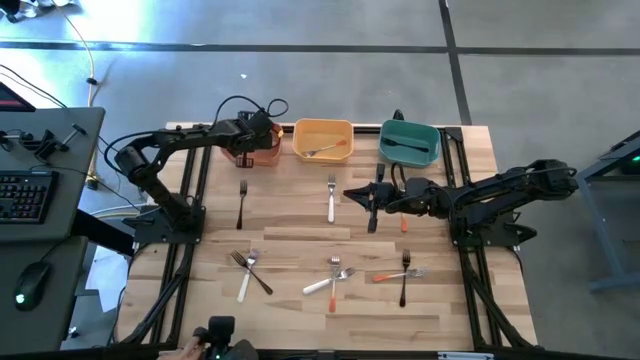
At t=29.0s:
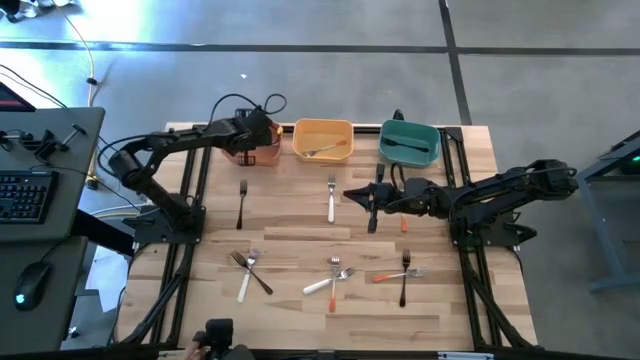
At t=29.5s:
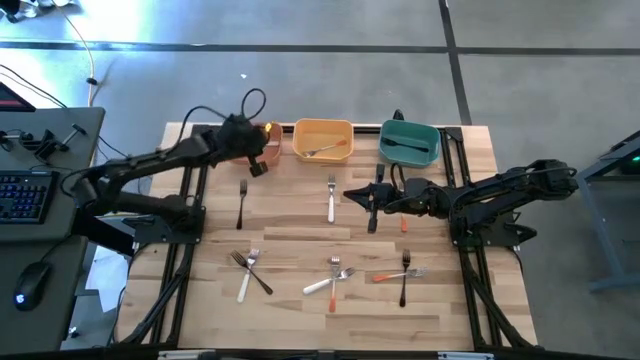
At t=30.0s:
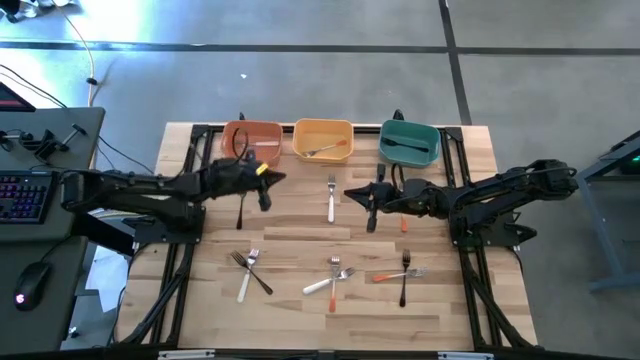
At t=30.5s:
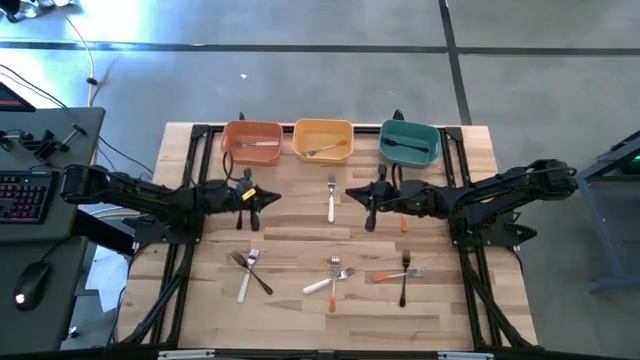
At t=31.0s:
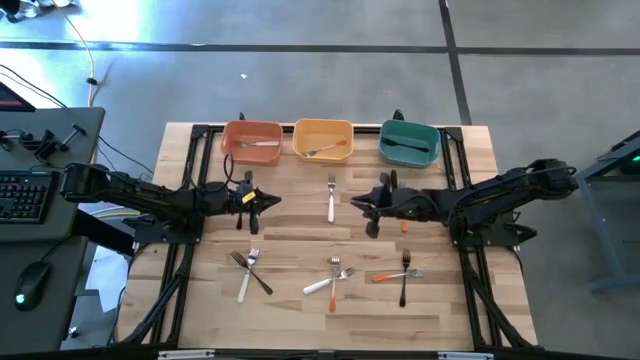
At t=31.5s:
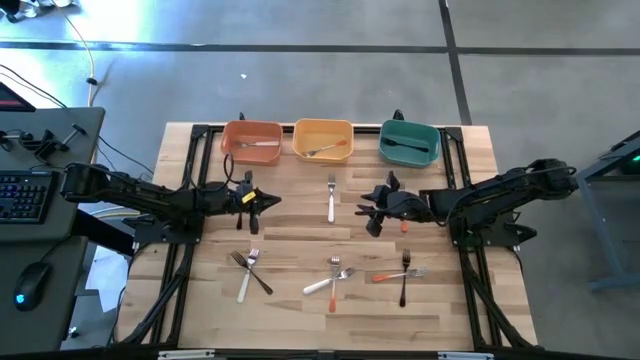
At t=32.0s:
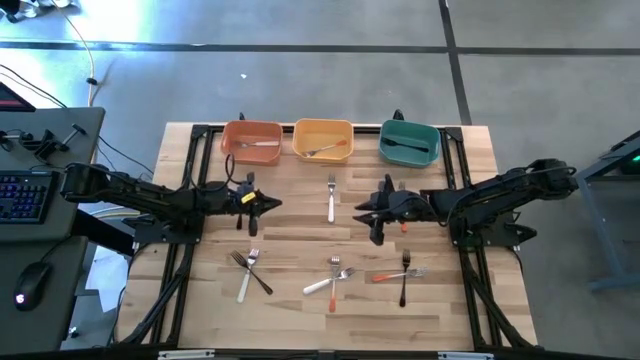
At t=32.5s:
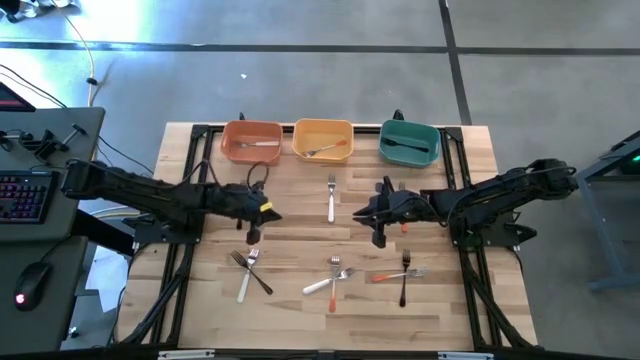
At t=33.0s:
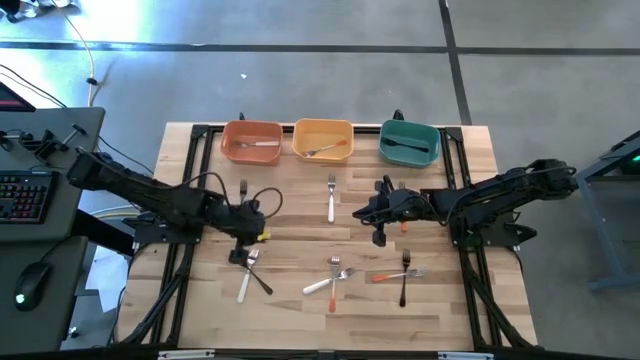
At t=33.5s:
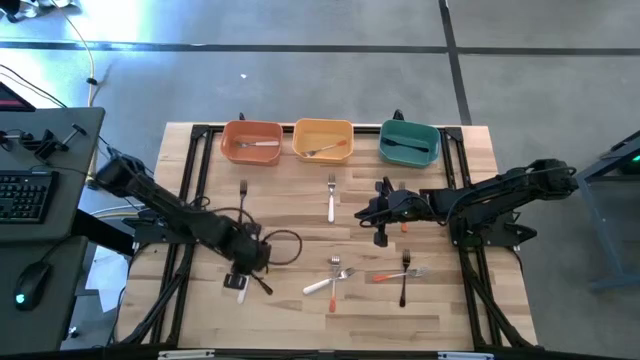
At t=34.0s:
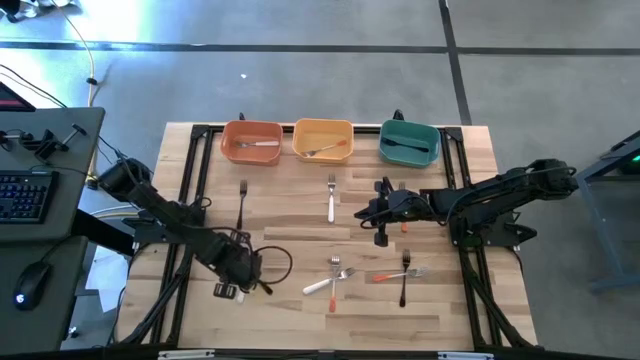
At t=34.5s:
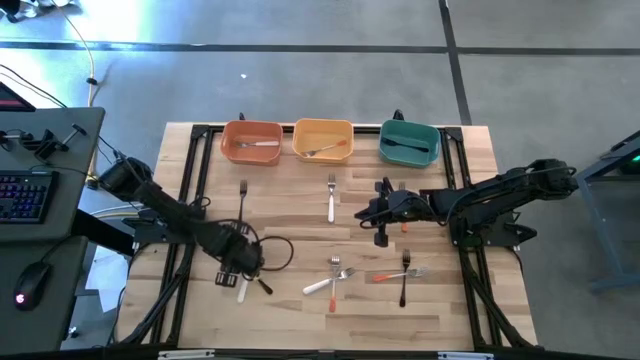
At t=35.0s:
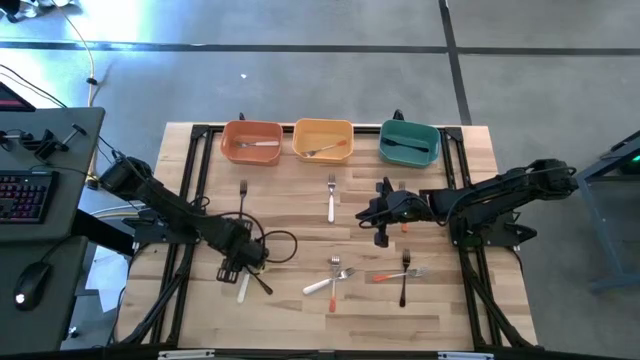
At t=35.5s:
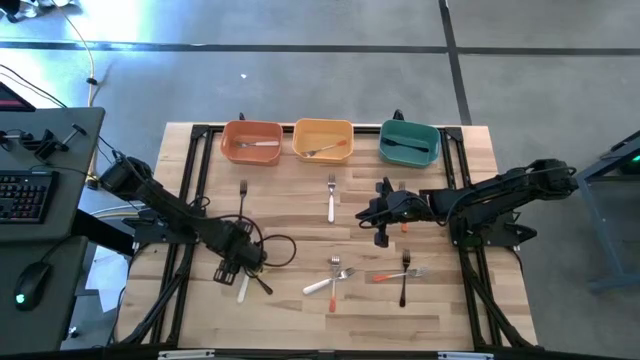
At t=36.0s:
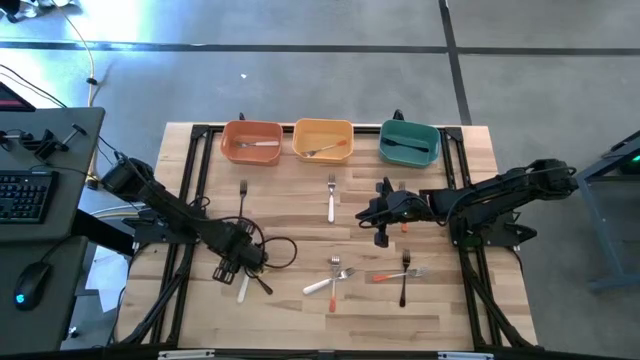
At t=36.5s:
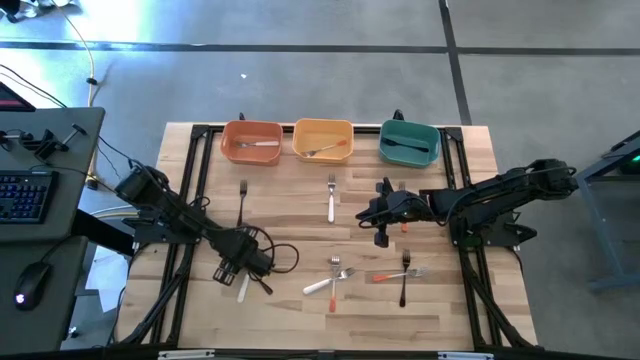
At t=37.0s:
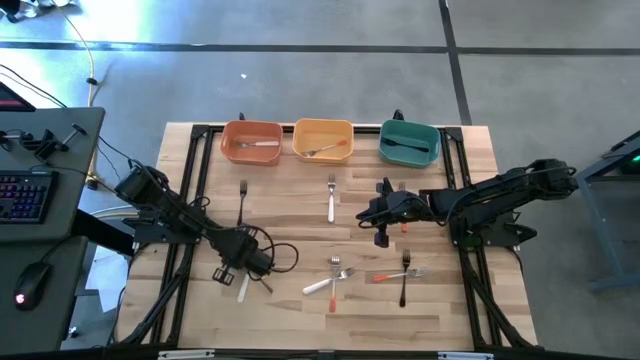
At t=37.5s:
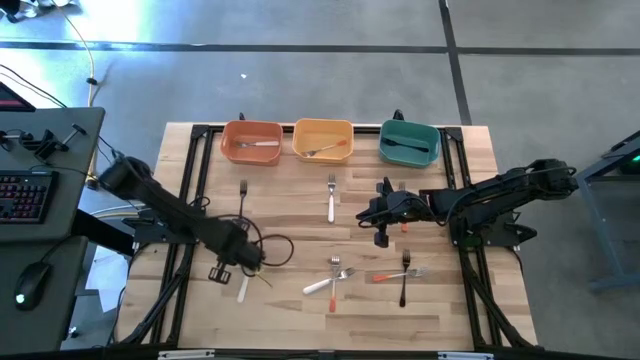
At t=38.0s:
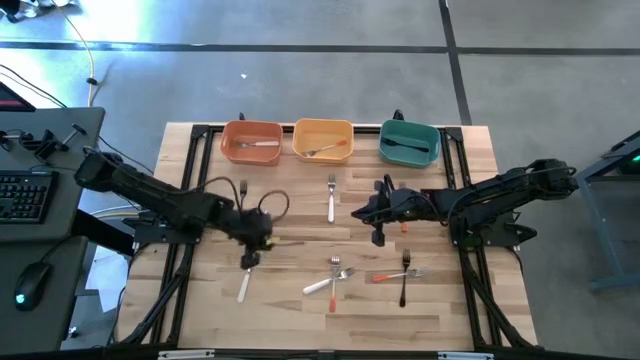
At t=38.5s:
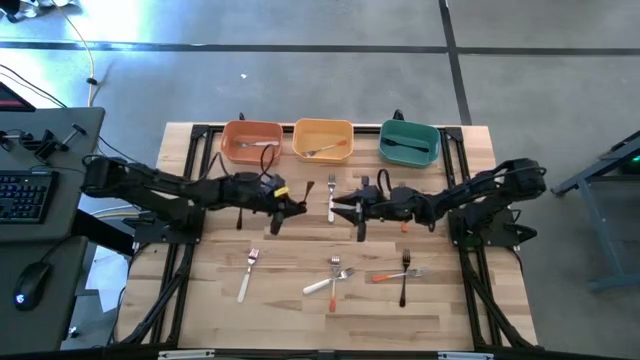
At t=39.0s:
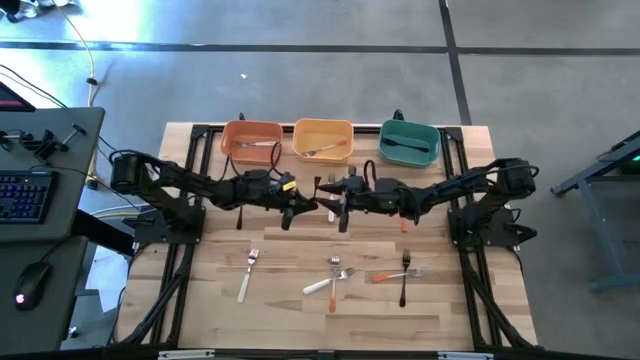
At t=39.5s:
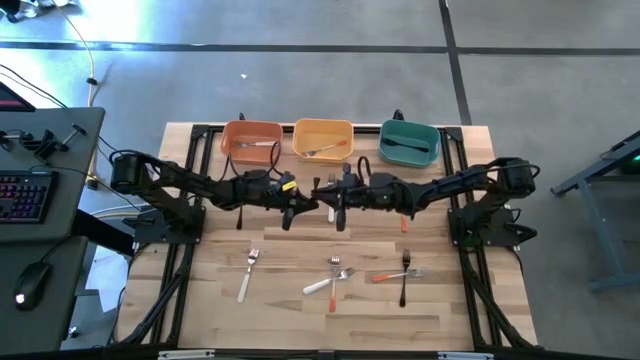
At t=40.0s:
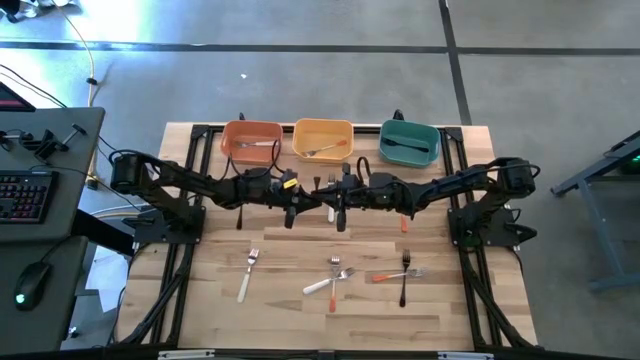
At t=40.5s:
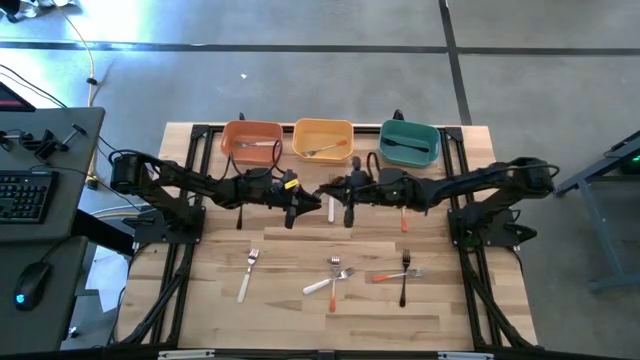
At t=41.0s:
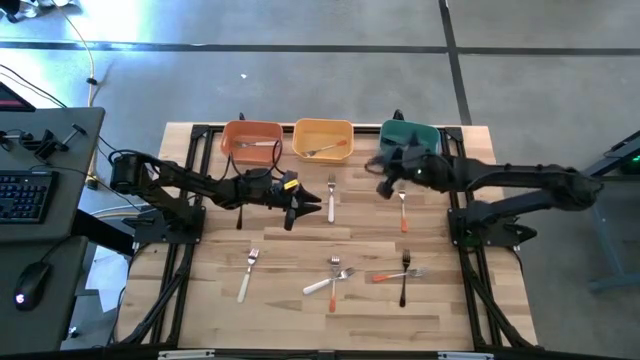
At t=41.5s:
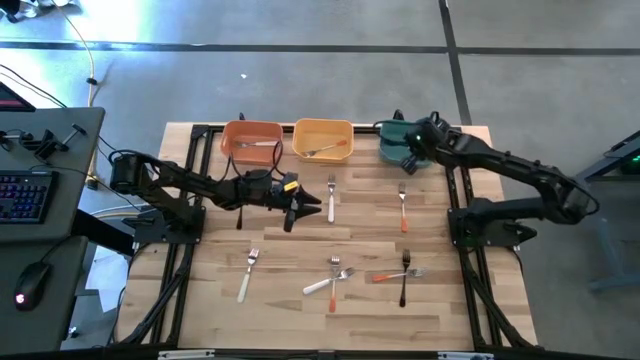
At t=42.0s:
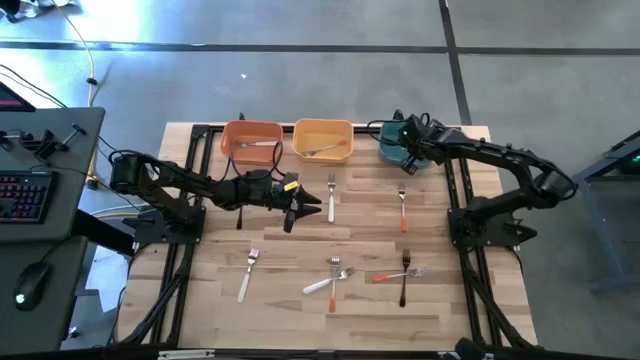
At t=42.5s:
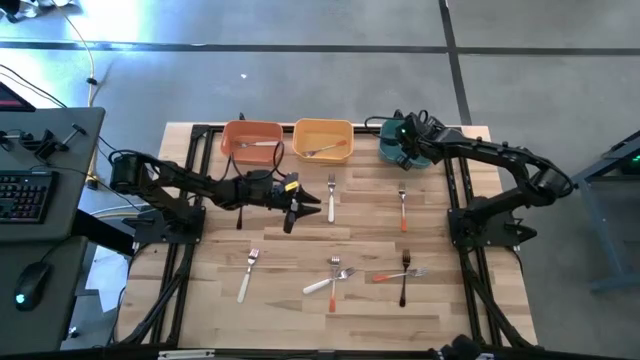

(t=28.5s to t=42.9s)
Task: Sort silverware by color (type)
Put the black fork into the green bin

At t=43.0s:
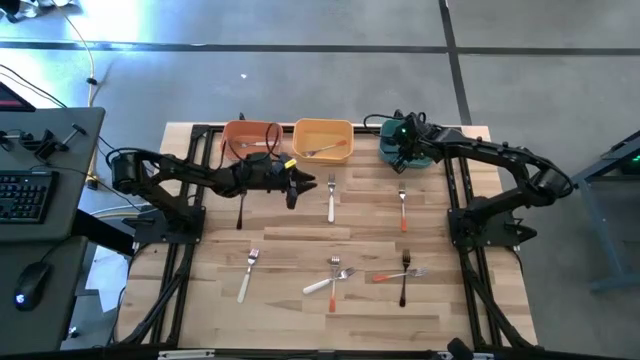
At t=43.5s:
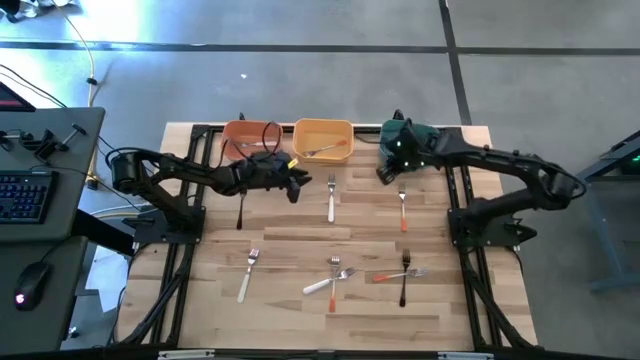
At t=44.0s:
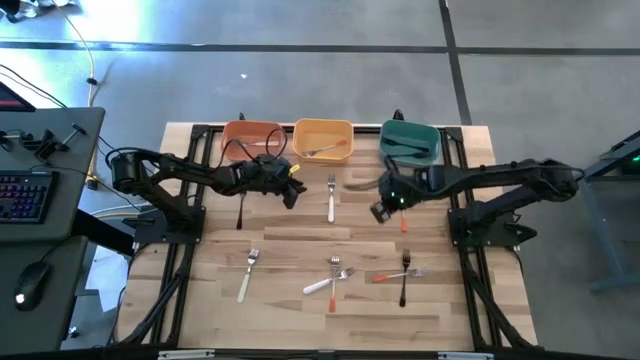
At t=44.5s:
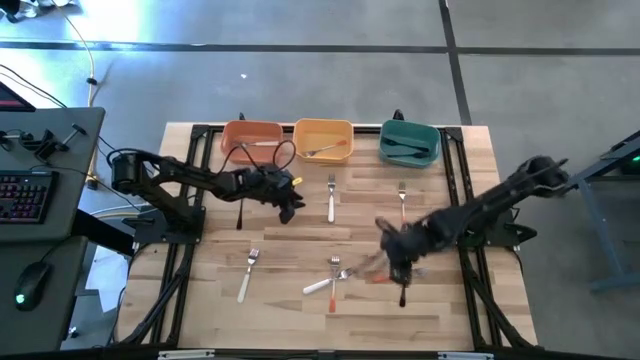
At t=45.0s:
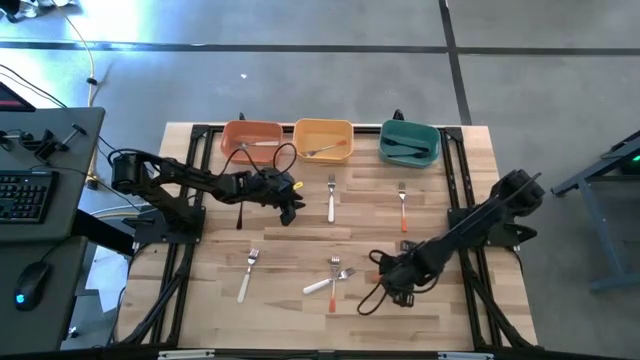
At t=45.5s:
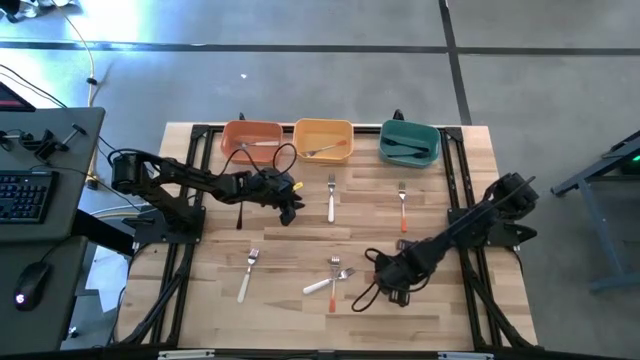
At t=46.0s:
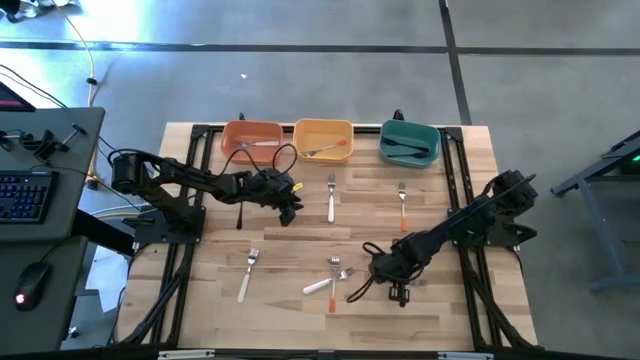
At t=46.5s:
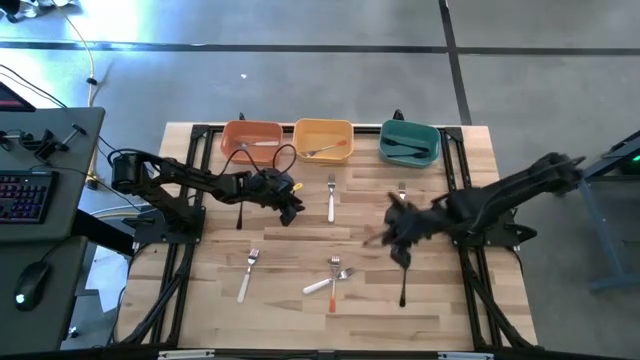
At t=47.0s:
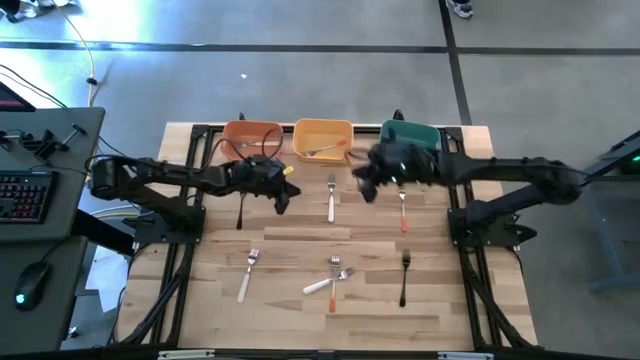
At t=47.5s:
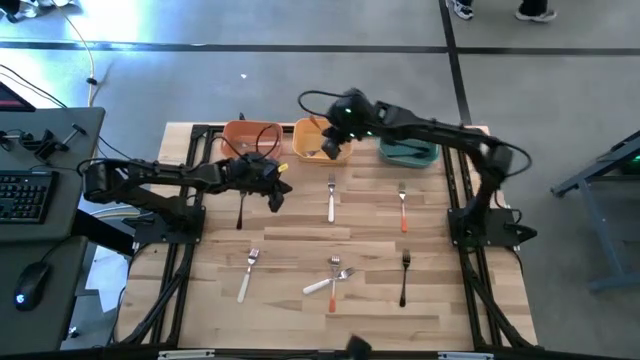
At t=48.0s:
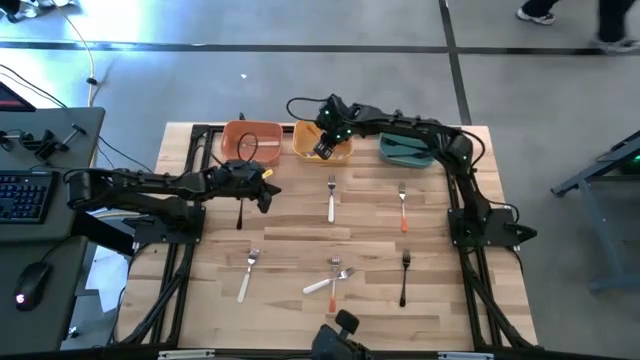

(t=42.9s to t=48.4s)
Put the orange fork into the yellow bin

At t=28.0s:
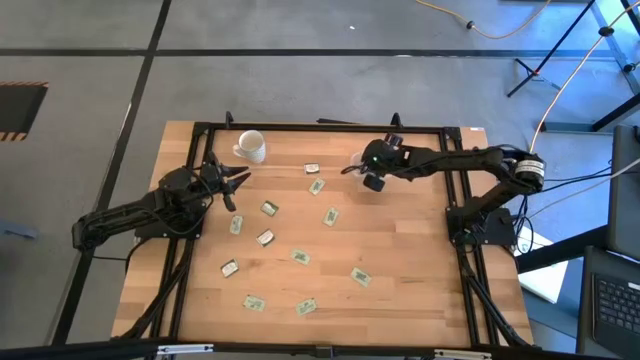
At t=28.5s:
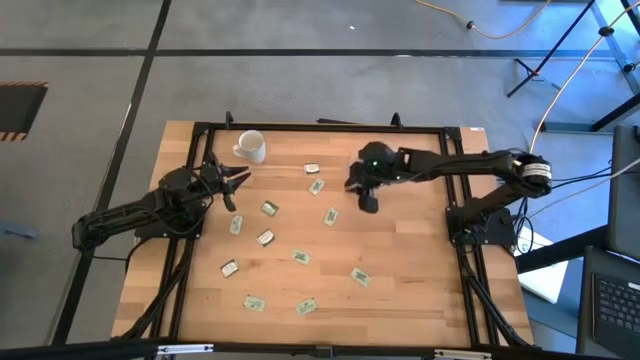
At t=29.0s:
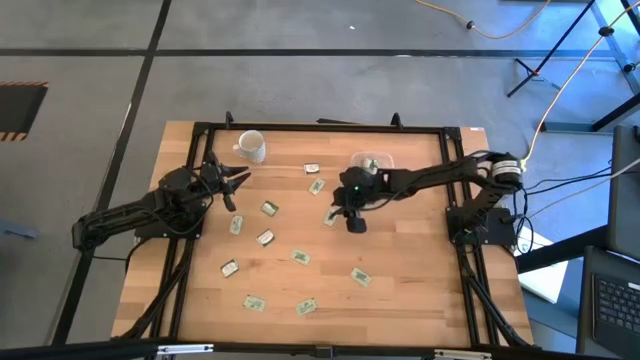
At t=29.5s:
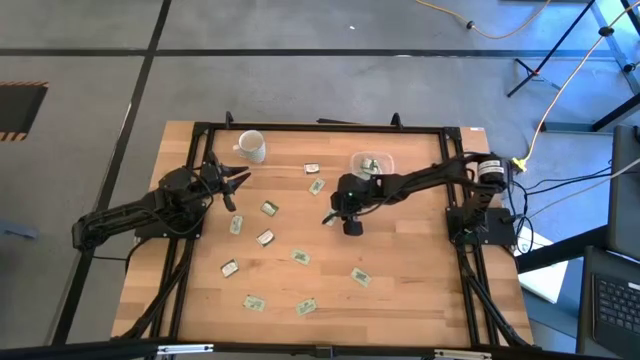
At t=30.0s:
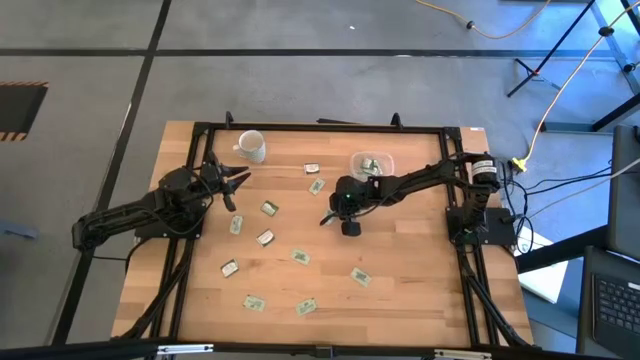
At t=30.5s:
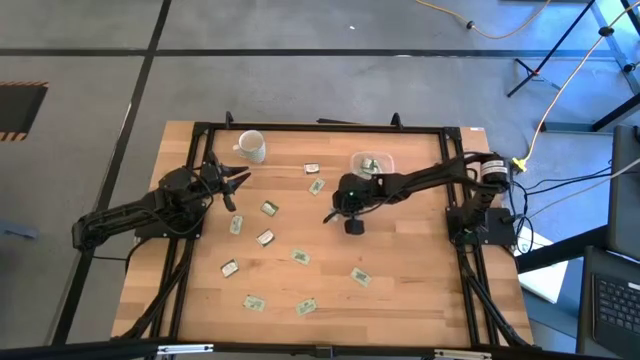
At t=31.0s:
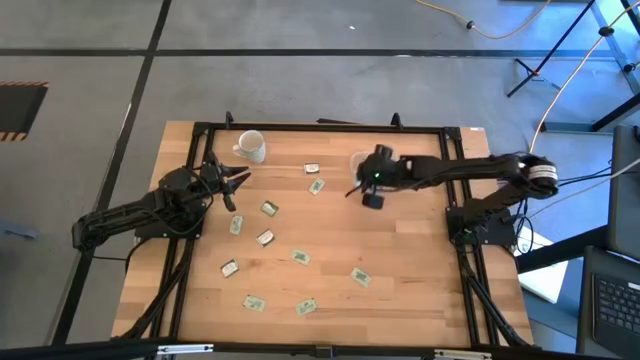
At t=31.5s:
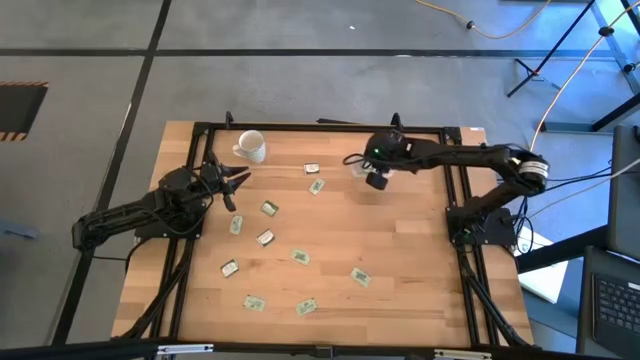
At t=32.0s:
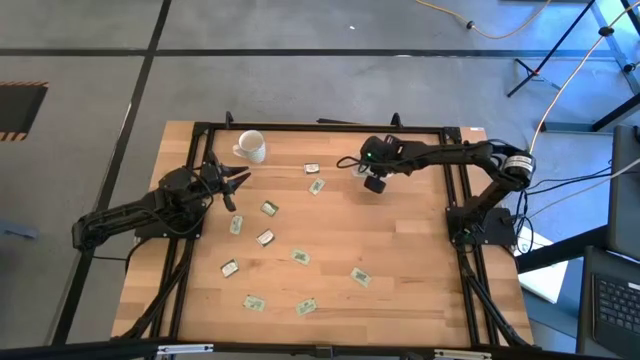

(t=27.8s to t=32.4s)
Task: Pick and place items into bin
Put the stevia packet into the transparent bin
